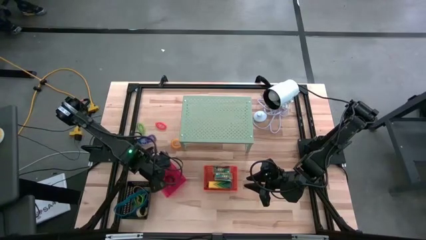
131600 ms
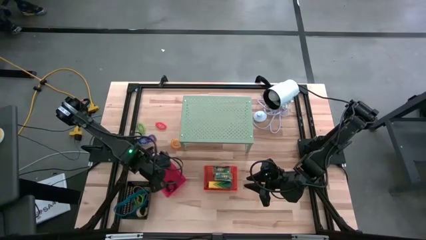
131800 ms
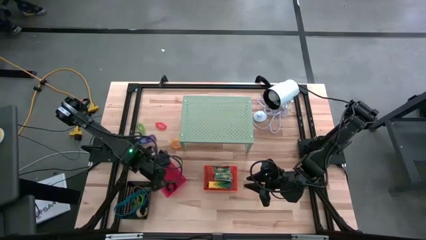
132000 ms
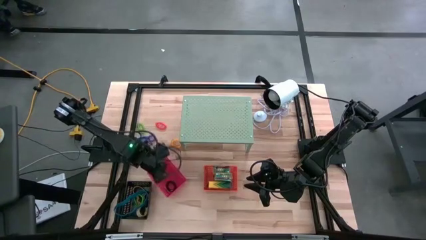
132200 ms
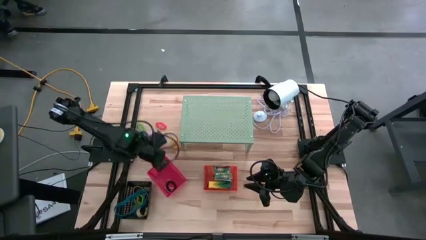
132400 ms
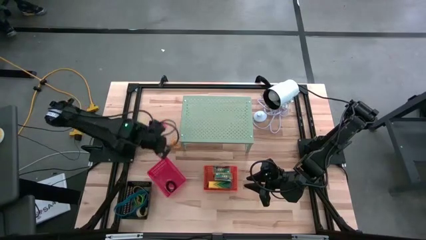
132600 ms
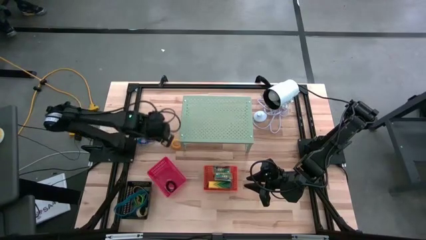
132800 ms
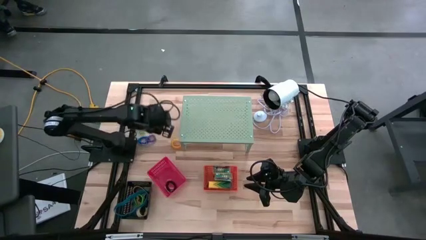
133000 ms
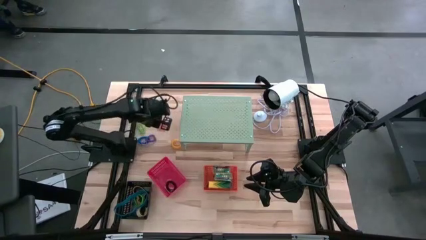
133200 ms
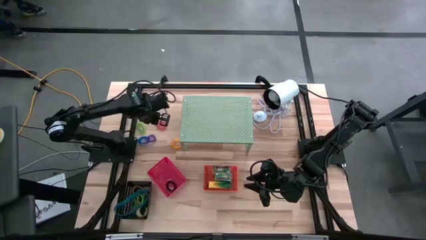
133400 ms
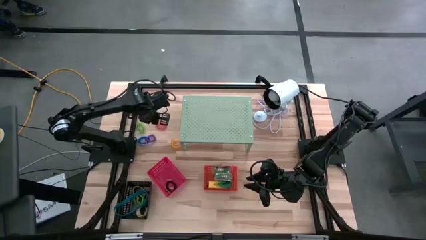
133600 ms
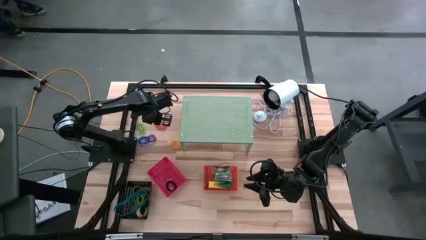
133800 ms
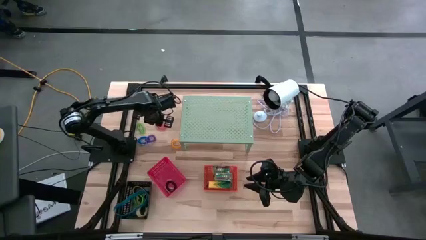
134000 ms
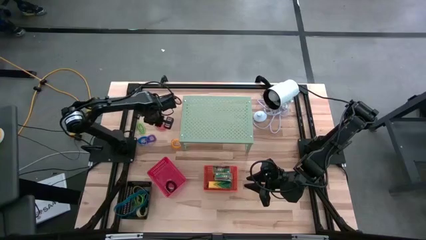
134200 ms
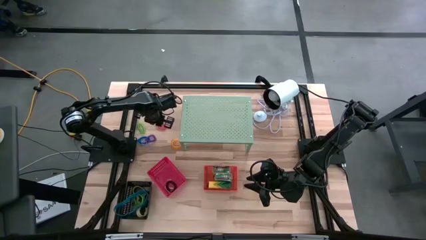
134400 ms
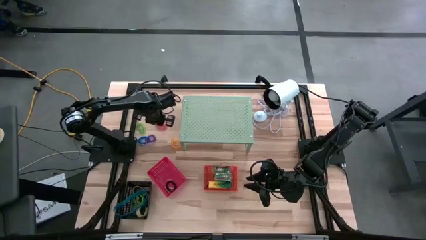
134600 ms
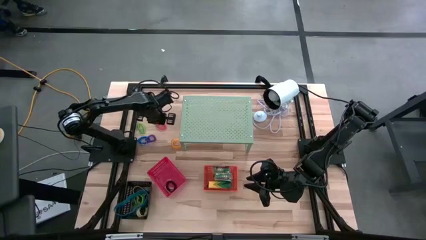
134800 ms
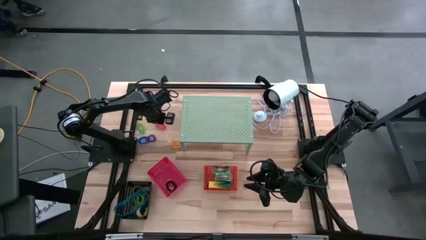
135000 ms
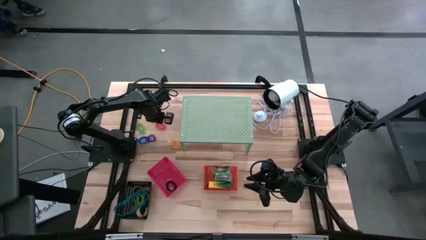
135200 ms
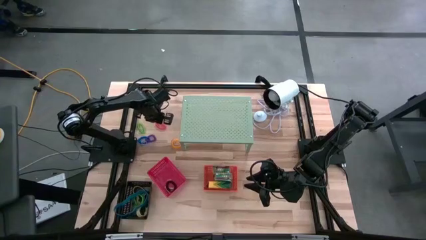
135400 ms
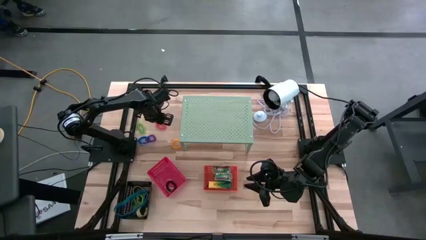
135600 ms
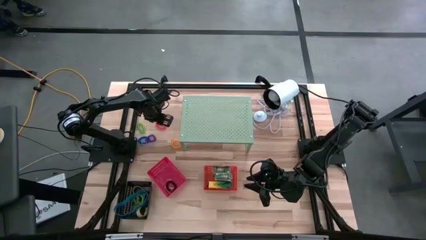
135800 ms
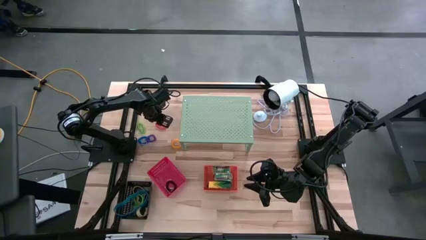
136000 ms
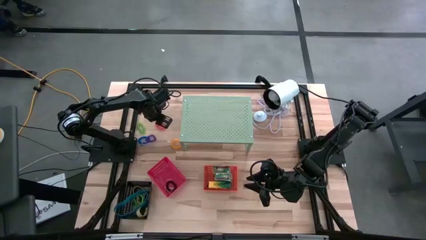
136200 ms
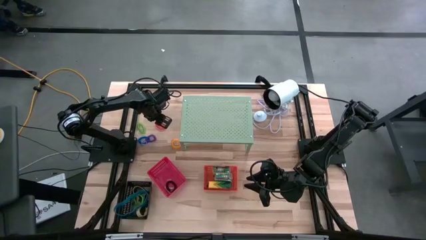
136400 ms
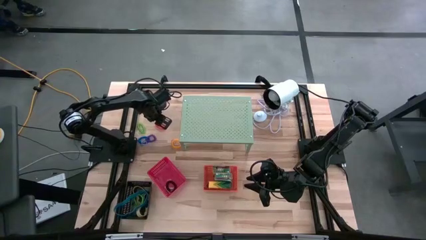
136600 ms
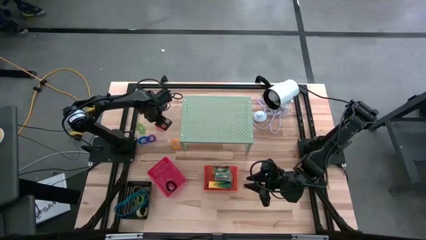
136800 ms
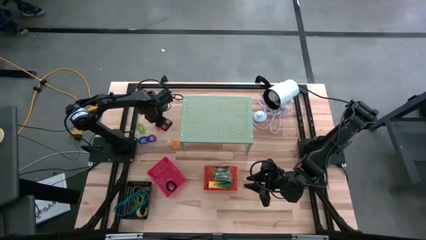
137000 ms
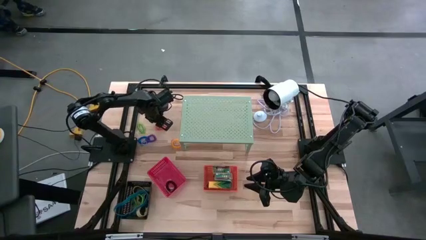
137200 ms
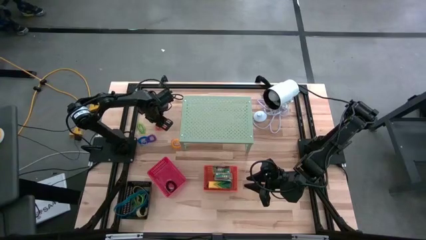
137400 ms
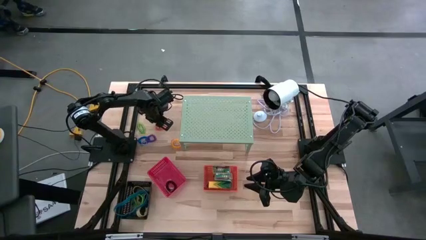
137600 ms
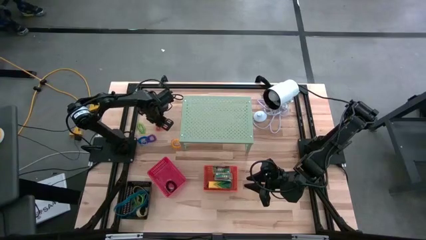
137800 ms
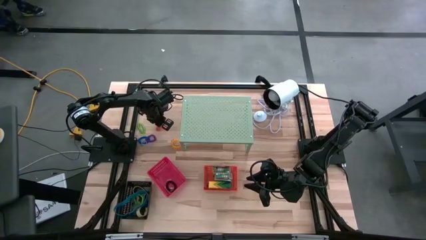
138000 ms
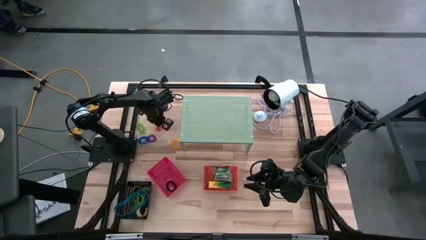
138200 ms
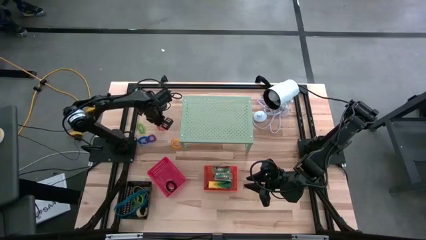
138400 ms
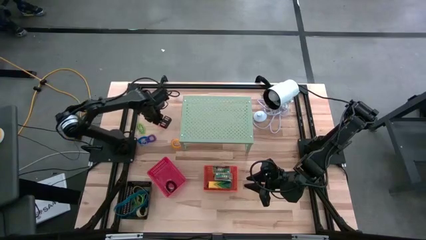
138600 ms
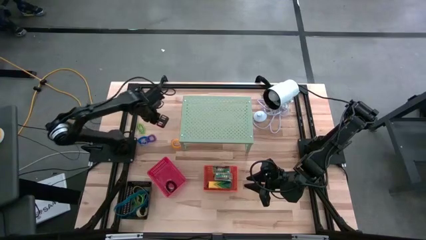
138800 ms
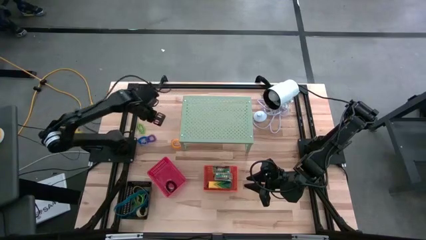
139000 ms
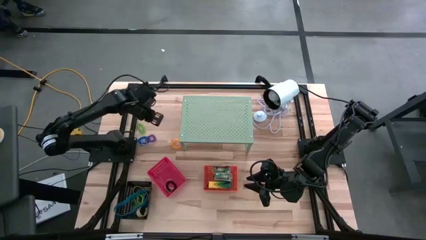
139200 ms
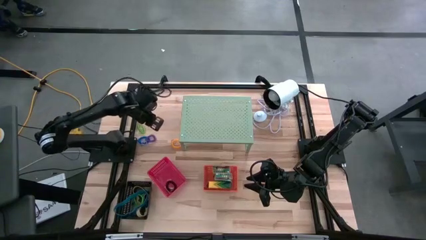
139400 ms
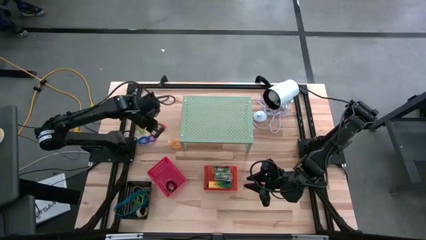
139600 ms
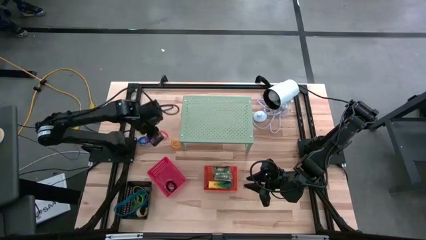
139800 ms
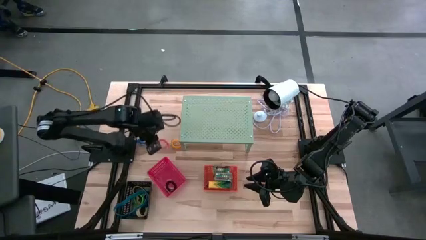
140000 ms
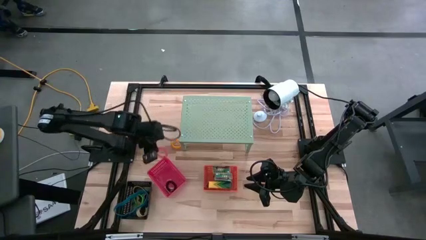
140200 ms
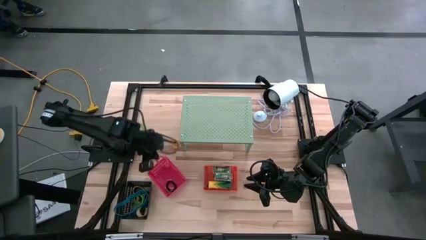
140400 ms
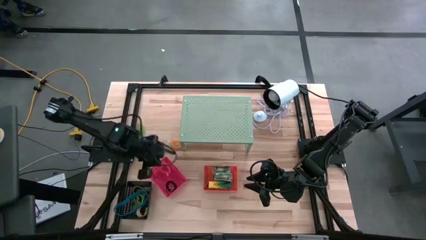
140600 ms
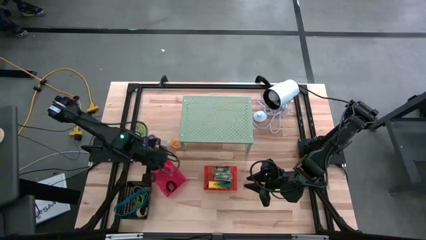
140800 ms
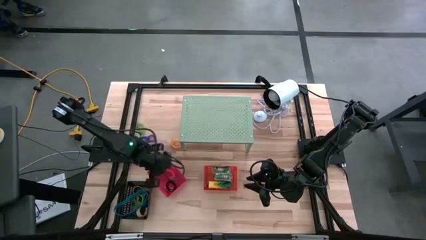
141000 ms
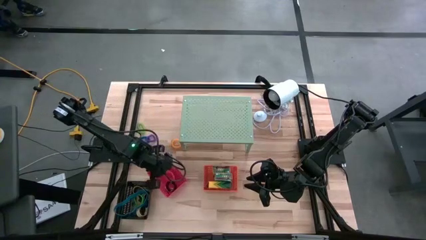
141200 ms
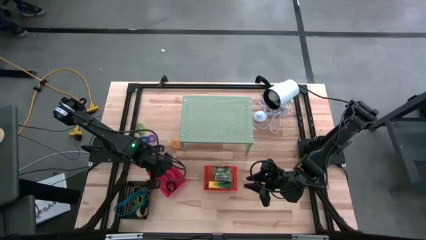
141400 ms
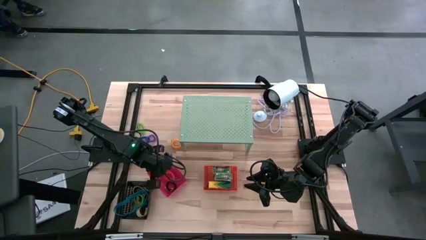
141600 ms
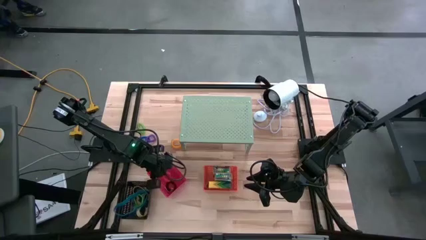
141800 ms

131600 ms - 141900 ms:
Task: Pick & Place Office Desk Supplies
Put the orange spring keychain into the red bin

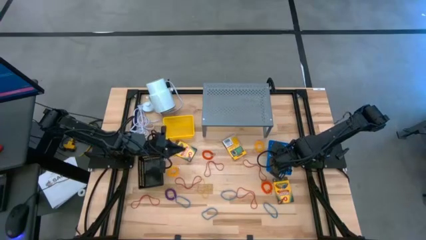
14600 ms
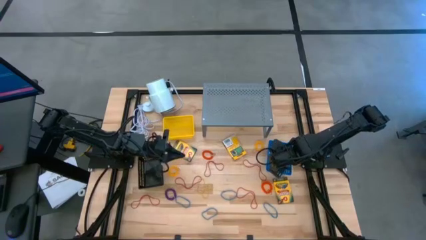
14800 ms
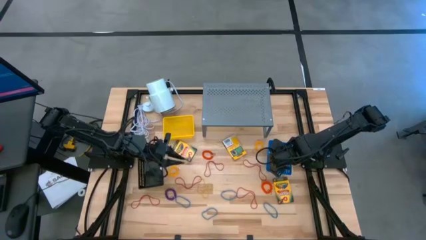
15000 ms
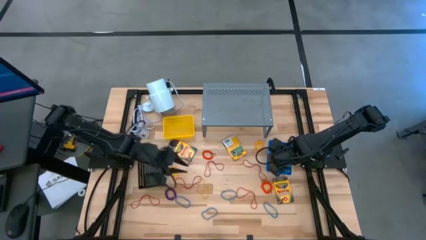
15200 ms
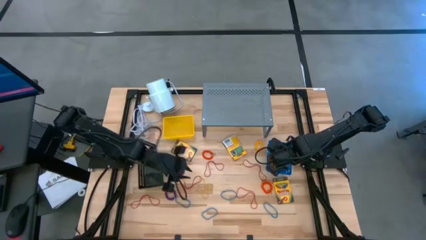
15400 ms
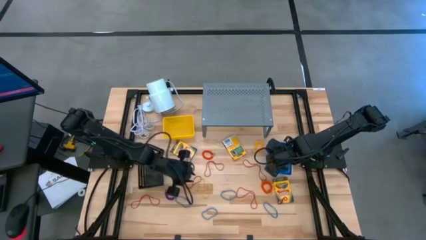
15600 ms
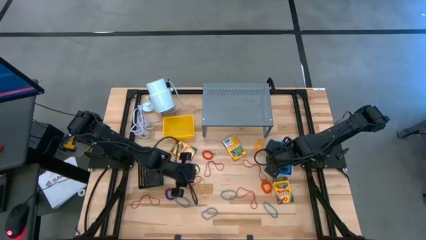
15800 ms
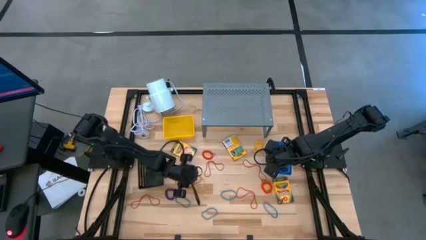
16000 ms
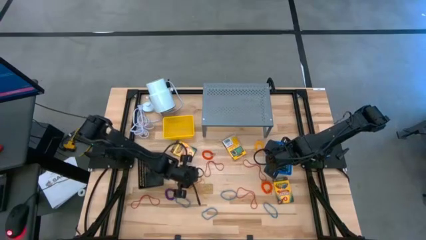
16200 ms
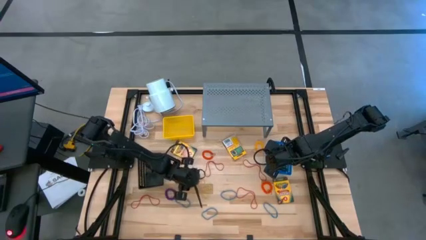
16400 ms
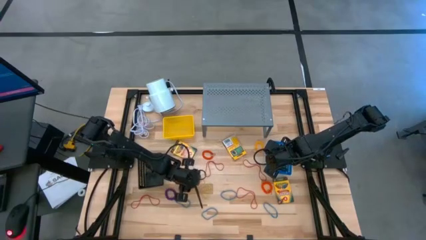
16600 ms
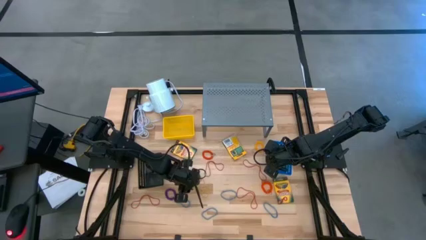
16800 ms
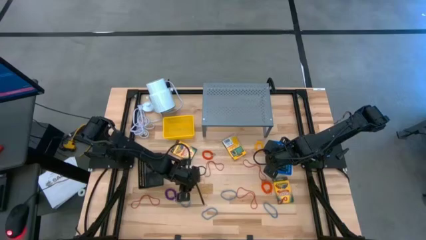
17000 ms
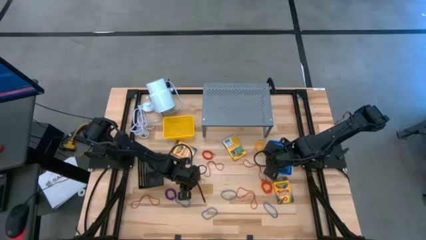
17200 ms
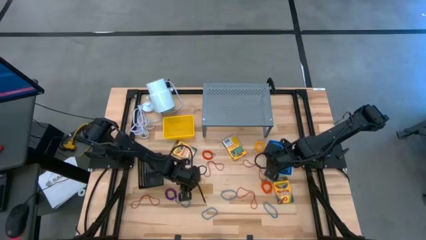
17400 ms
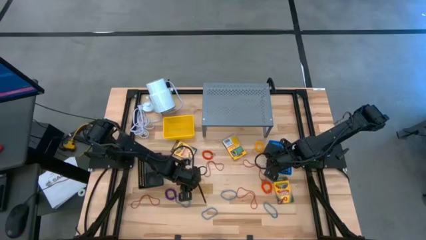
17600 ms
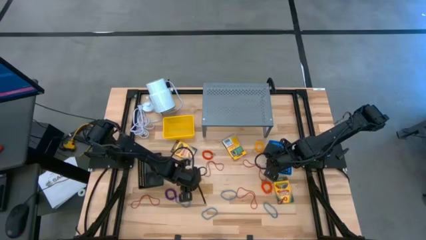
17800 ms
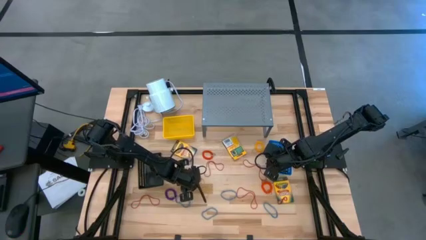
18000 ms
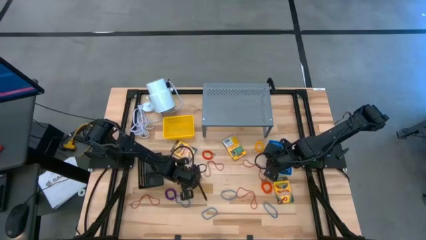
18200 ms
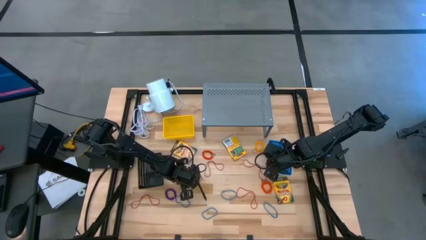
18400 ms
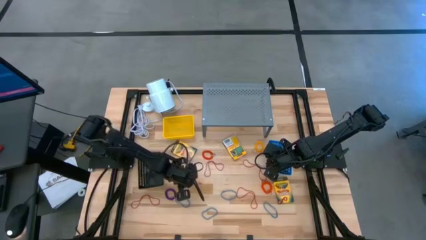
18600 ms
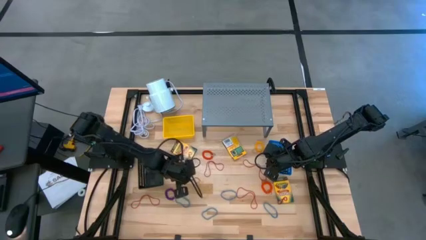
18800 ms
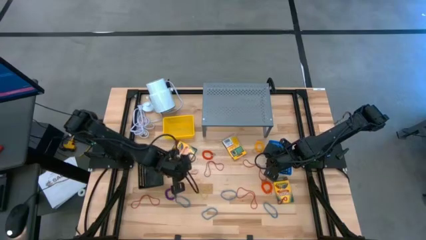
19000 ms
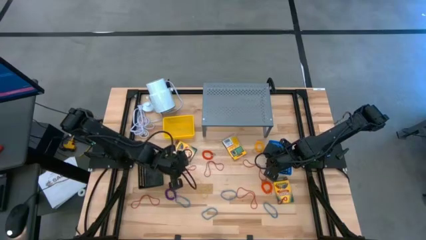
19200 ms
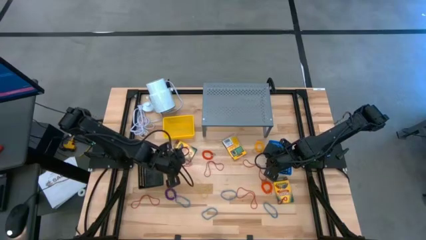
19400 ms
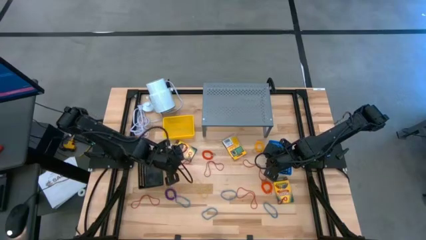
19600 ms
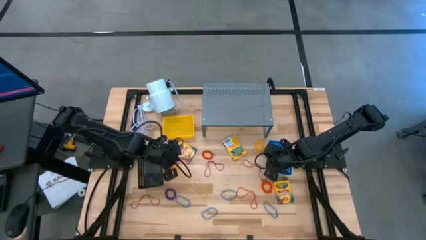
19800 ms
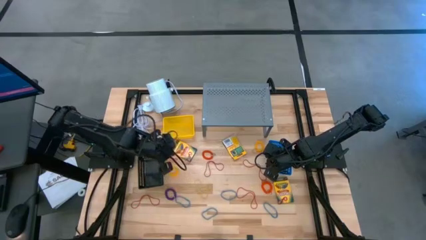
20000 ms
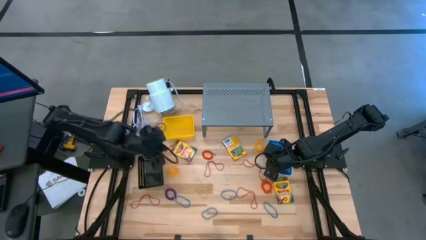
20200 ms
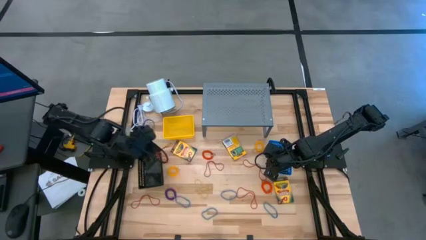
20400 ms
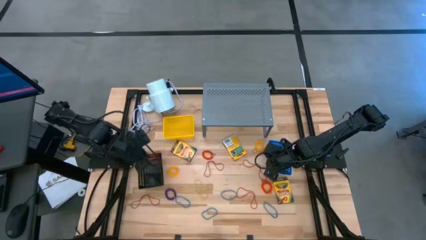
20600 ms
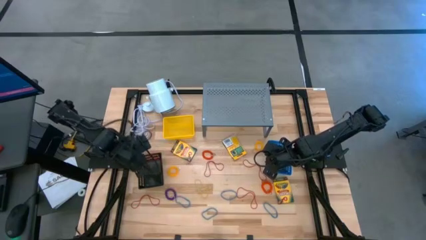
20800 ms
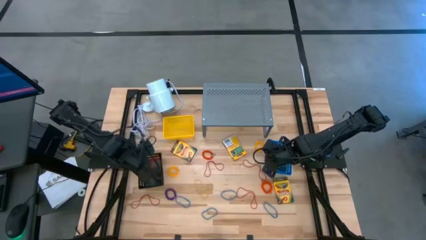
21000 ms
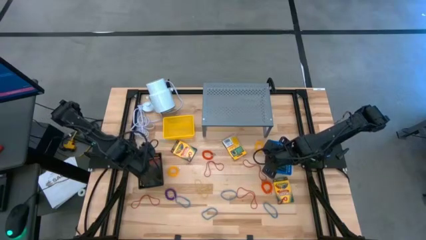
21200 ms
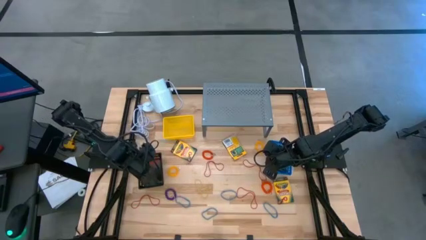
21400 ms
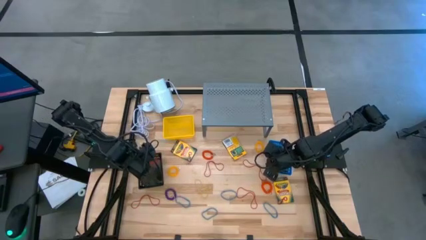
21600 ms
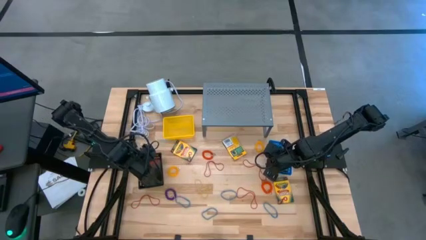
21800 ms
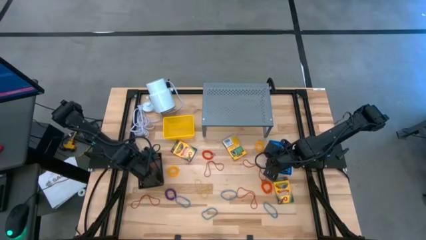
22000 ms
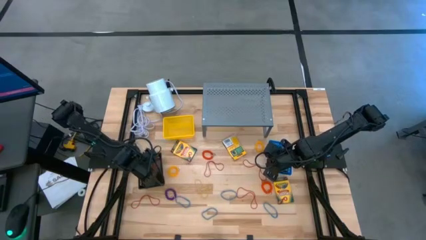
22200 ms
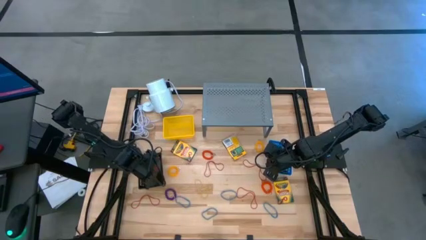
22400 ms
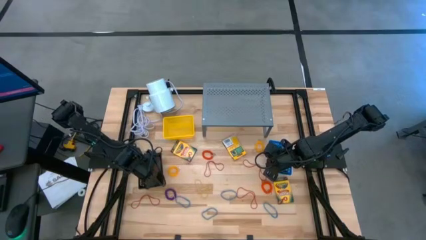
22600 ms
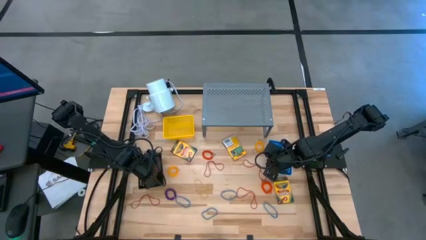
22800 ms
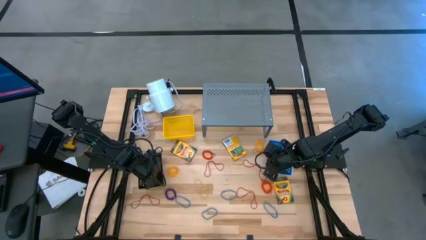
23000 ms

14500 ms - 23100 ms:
Task: Pick & Place Office Desk Supplies
Put the red rubber band into the black bin
